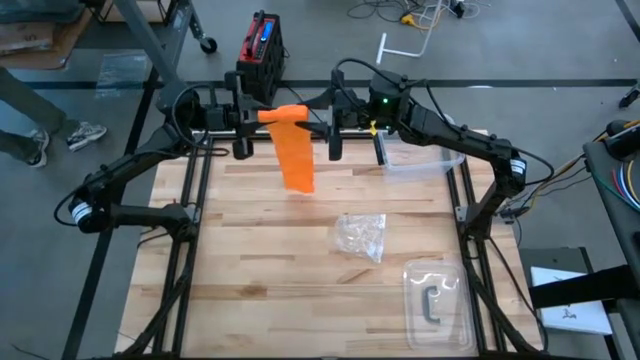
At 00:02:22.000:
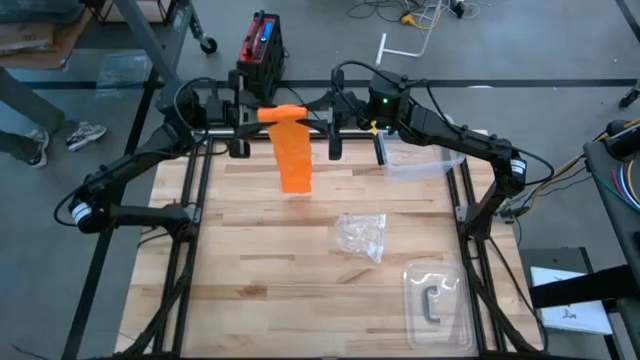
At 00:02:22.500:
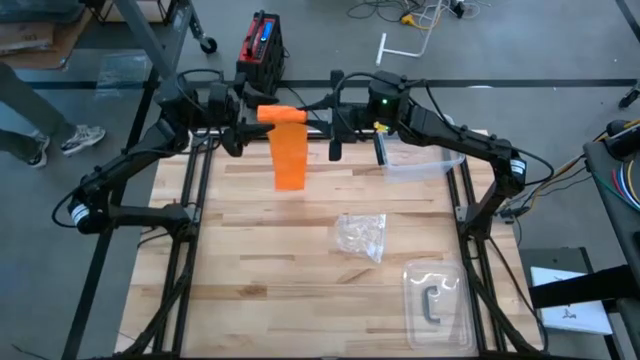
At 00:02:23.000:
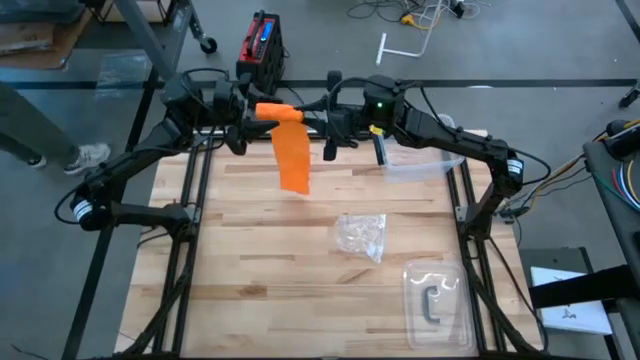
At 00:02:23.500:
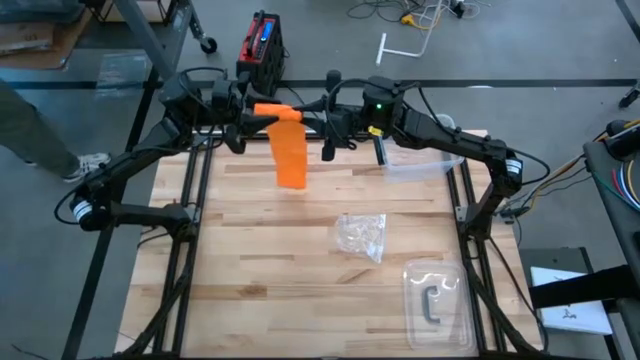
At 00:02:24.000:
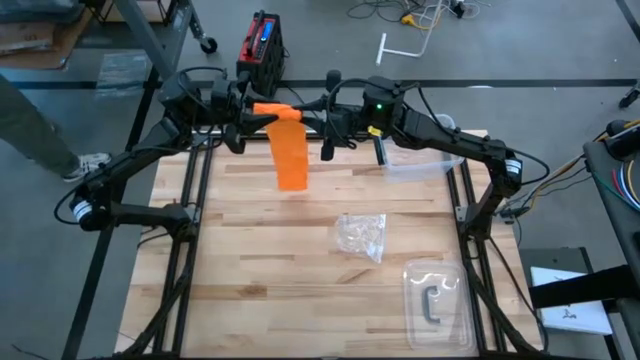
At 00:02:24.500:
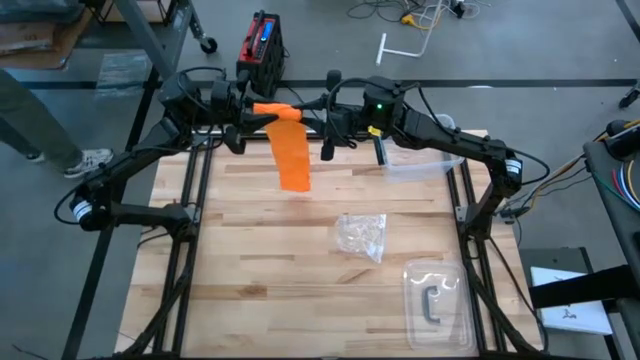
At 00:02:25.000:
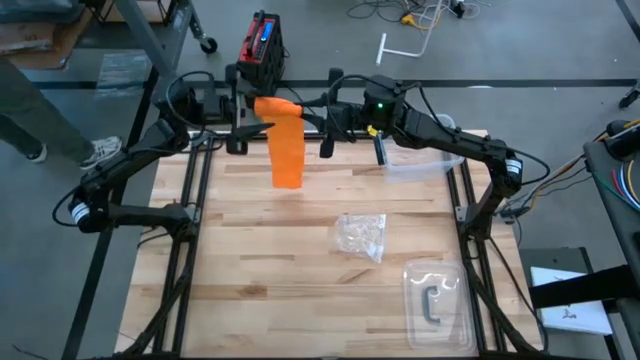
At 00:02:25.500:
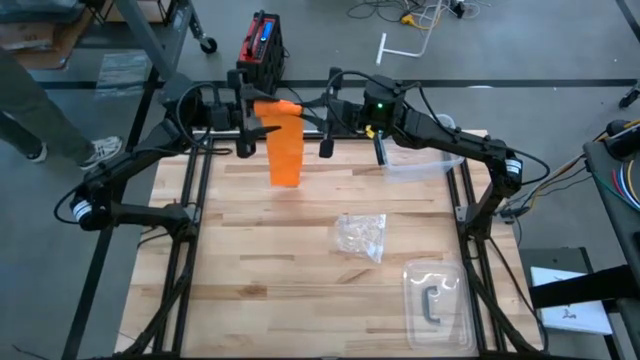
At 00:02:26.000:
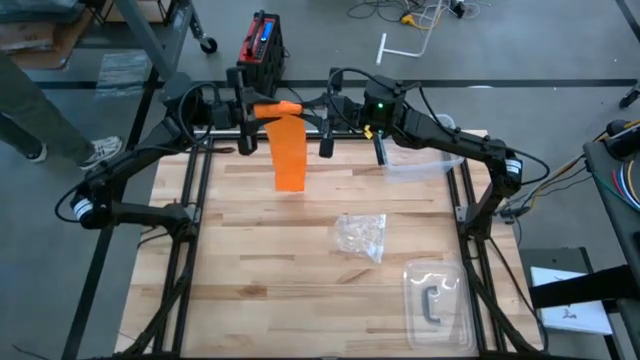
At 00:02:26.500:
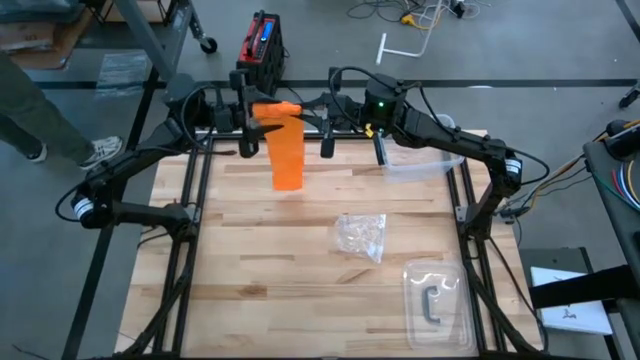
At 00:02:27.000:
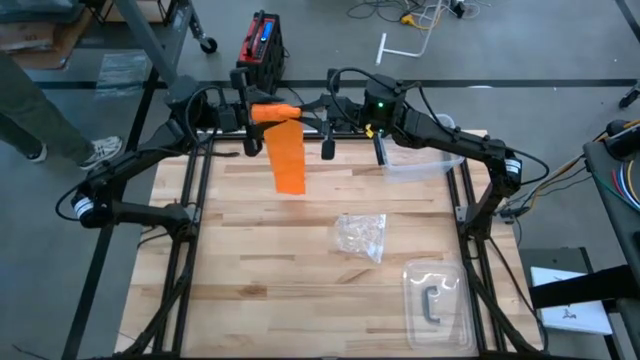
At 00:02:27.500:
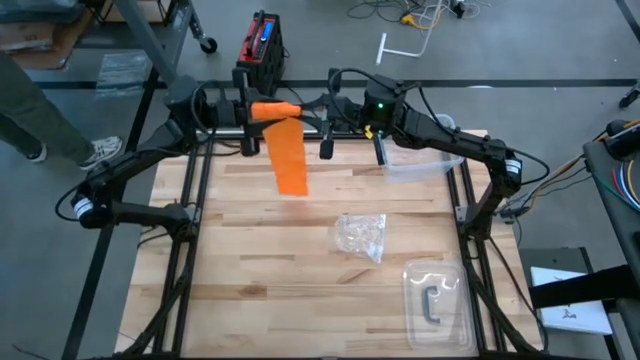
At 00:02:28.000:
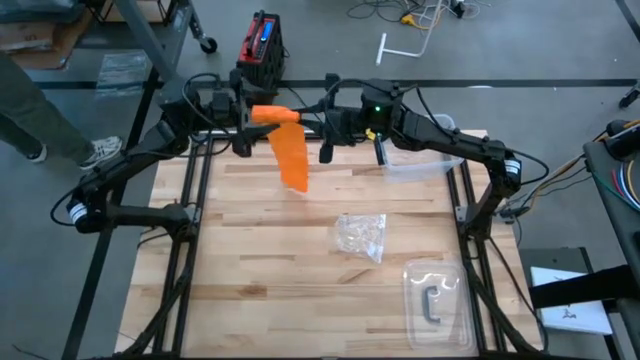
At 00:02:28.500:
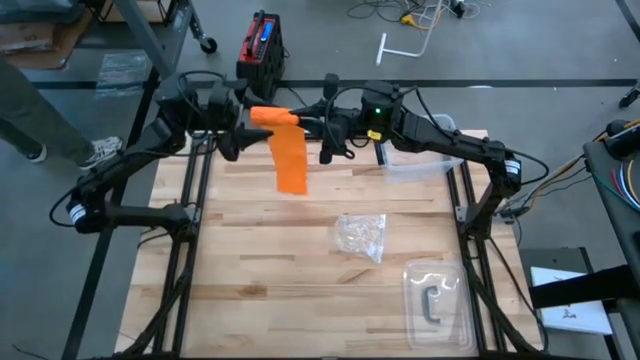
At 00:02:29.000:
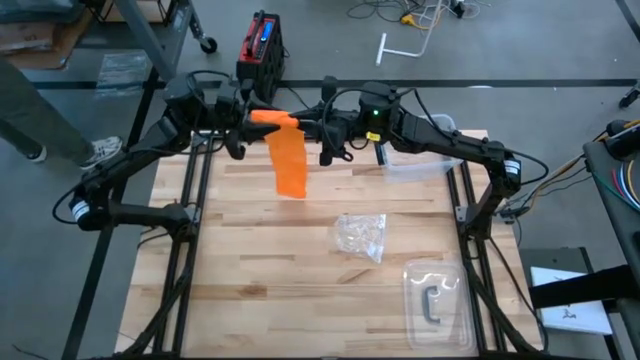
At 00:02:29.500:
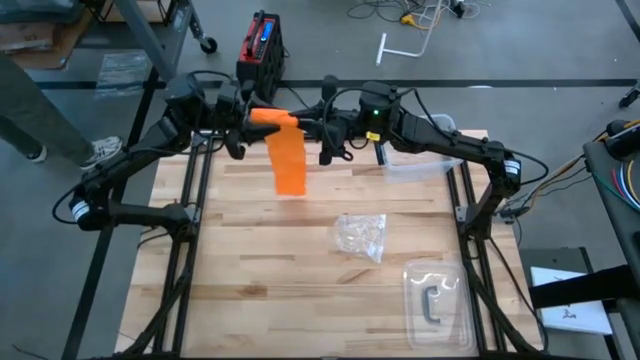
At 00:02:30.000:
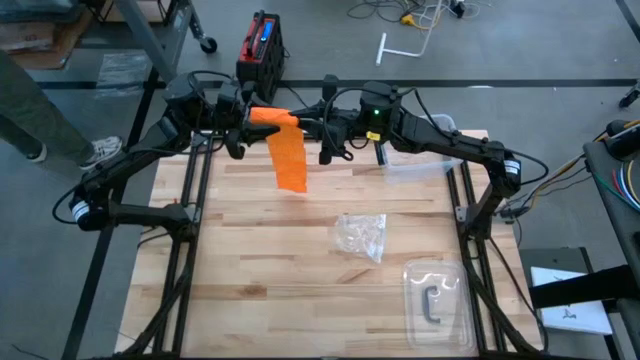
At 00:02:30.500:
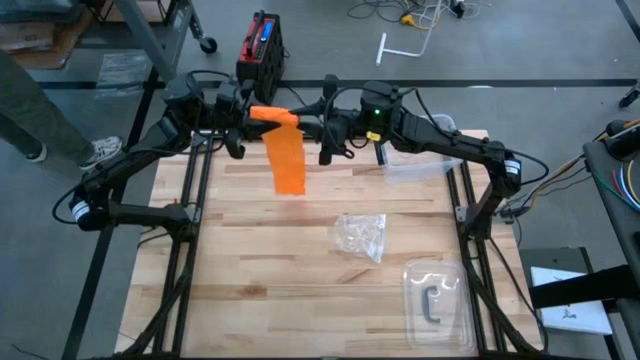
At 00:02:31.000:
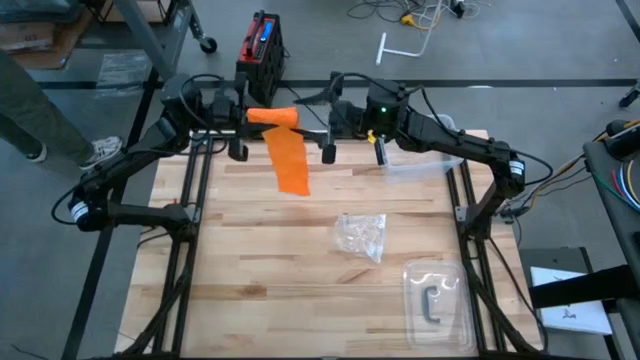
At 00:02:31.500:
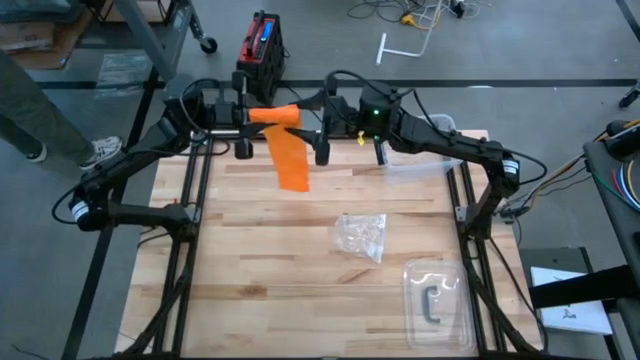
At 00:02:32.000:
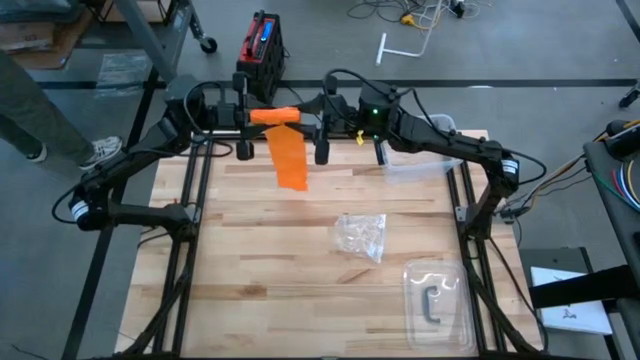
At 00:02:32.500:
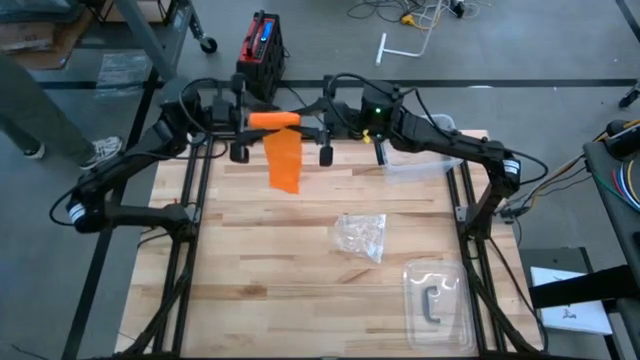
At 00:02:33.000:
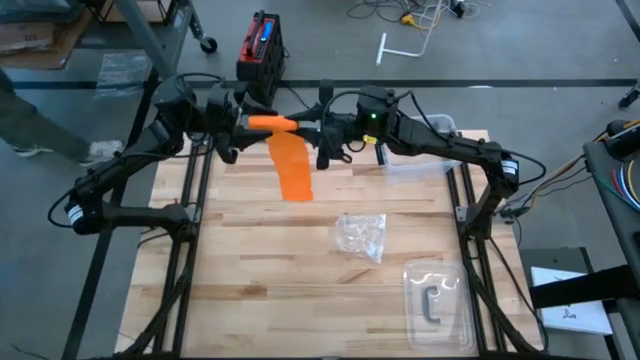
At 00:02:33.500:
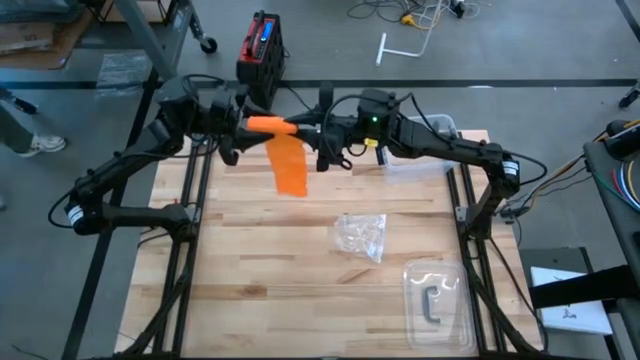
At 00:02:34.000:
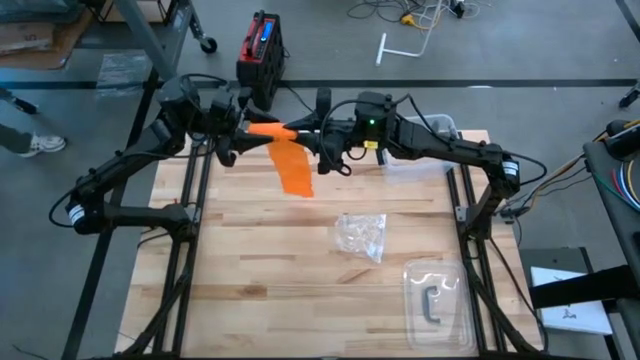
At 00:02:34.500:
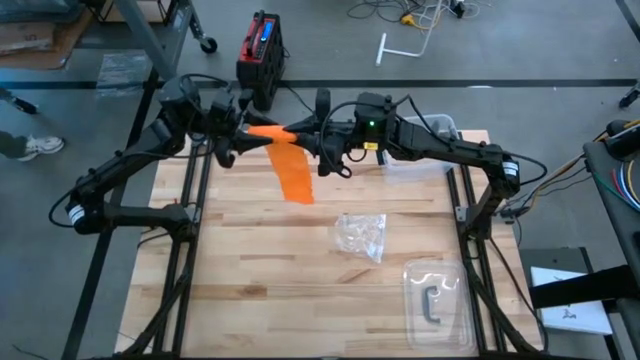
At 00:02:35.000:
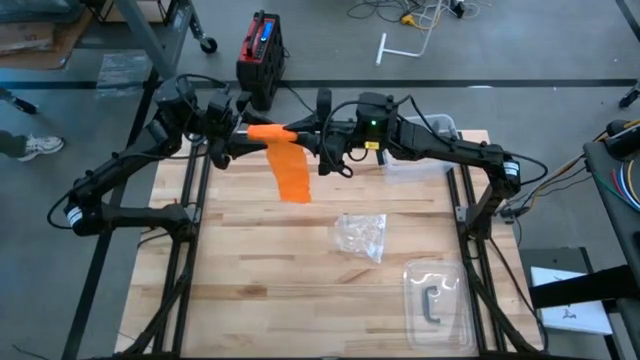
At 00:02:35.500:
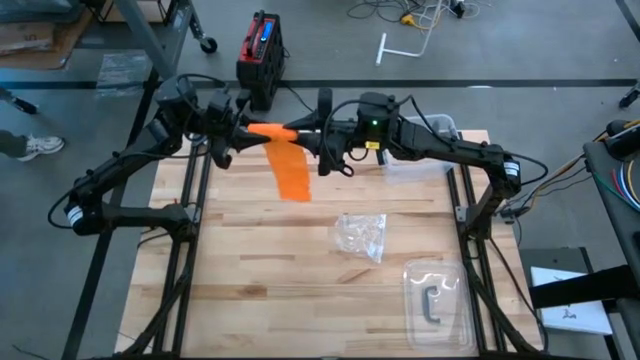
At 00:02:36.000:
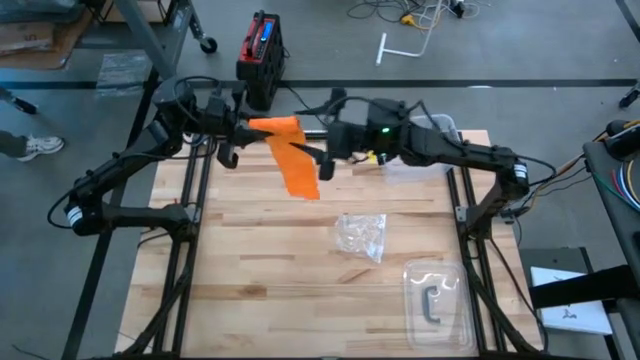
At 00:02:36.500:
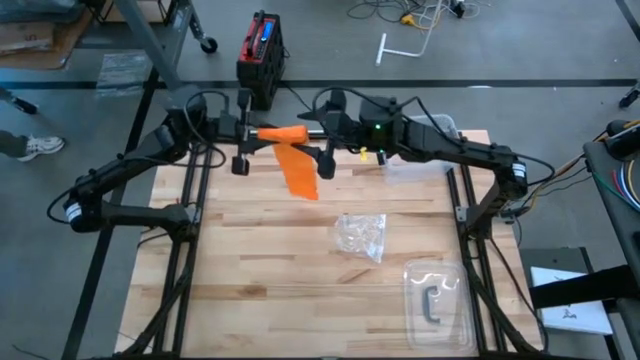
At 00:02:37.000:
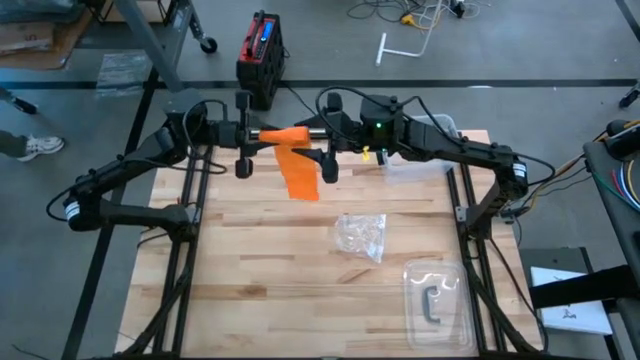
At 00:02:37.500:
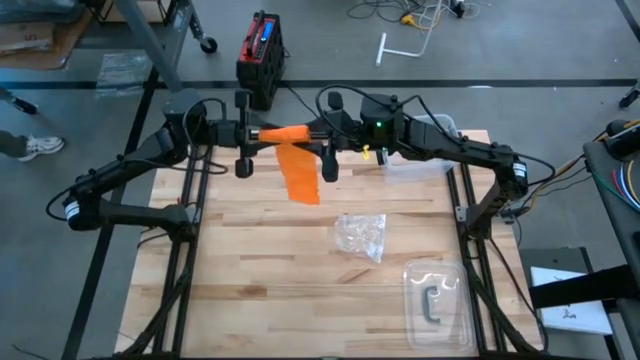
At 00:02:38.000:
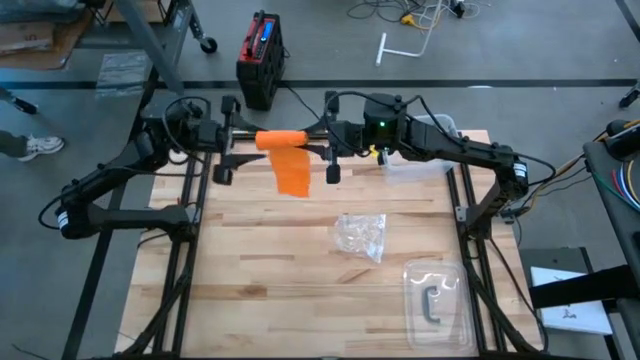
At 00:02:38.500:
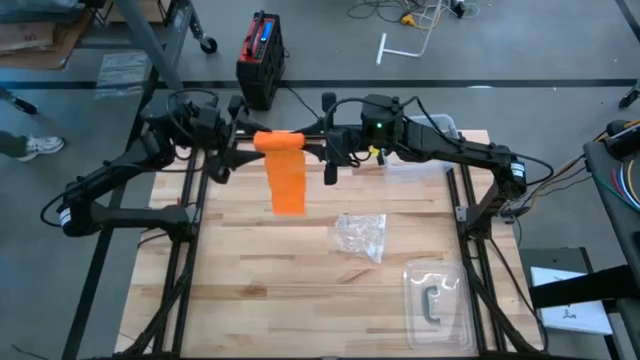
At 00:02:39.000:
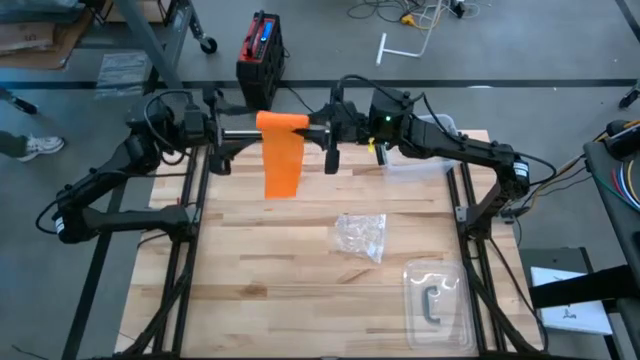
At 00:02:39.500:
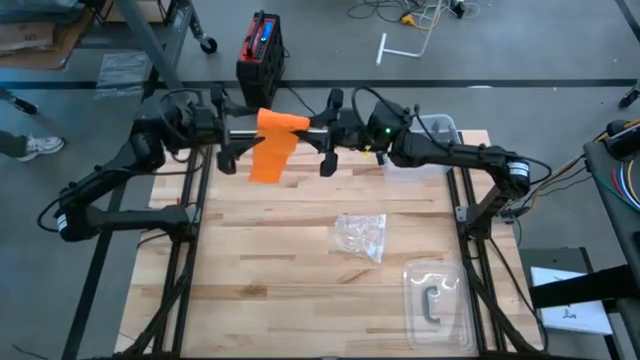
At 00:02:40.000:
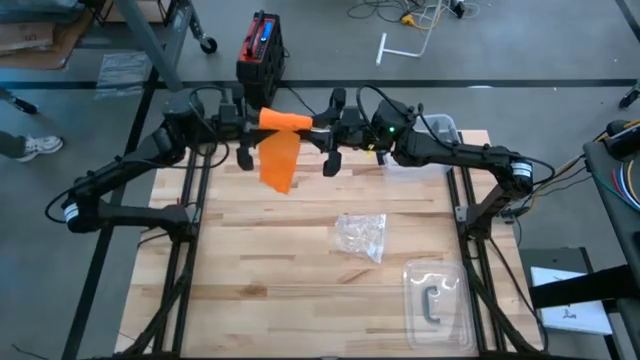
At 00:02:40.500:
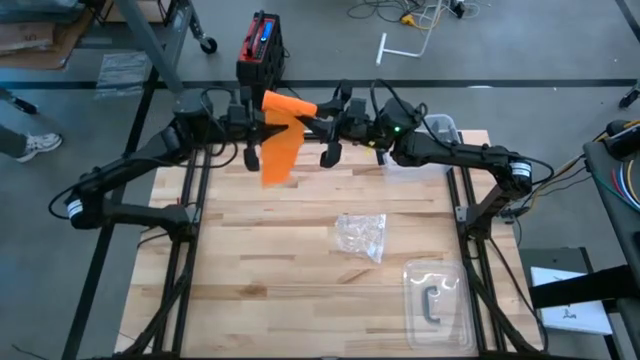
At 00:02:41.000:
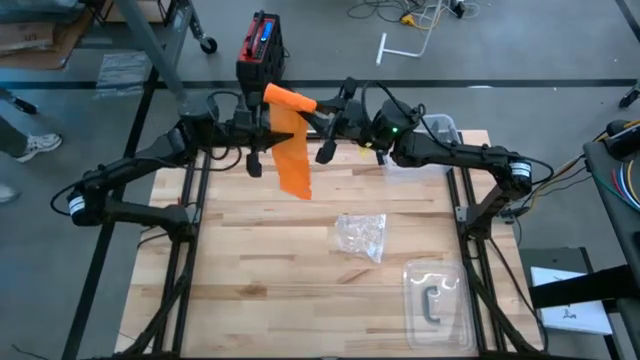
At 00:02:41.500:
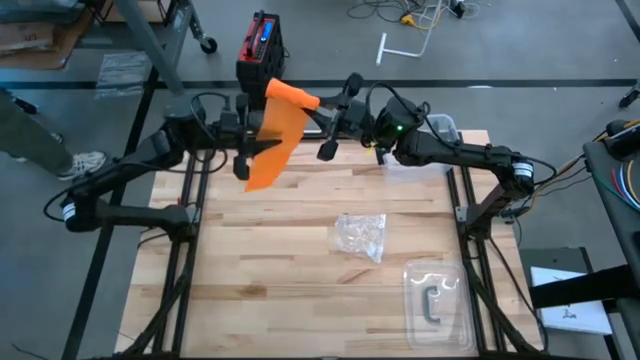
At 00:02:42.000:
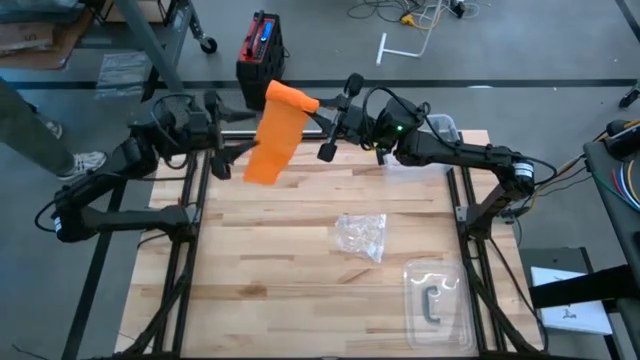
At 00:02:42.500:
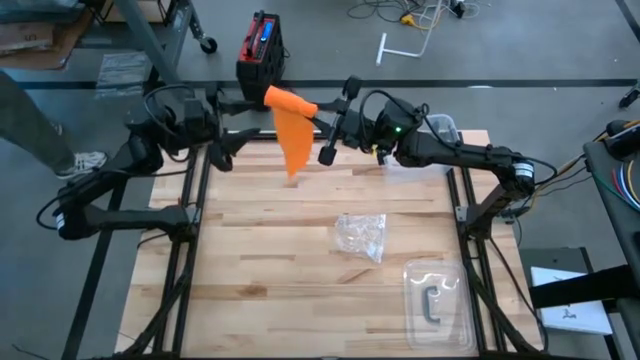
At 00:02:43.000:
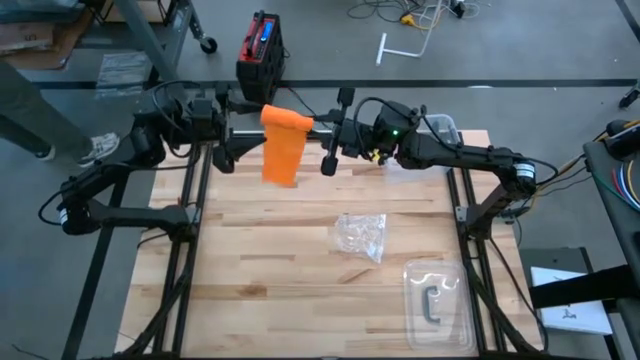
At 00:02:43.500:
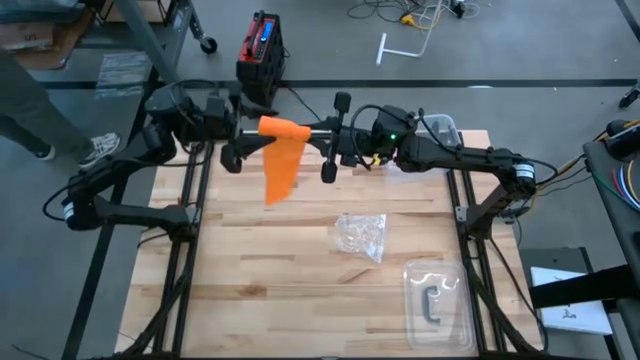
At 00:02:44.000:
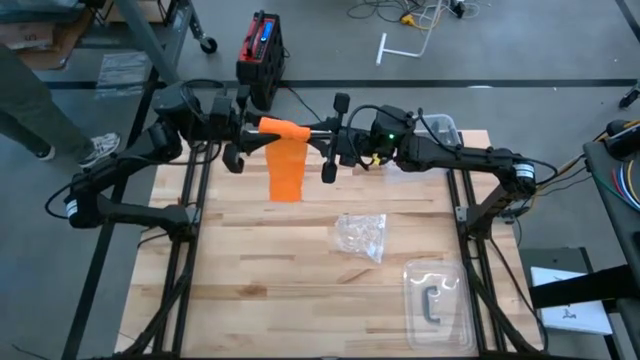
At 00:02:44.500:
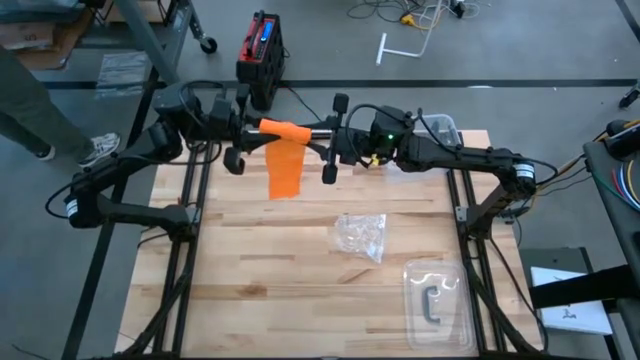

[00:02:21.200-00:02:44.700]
Task: Roll bandage
Roll the orange bandage
